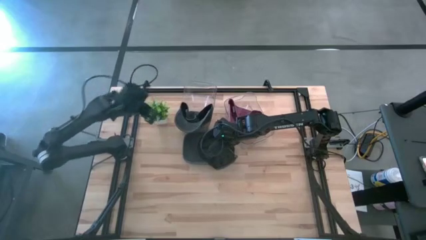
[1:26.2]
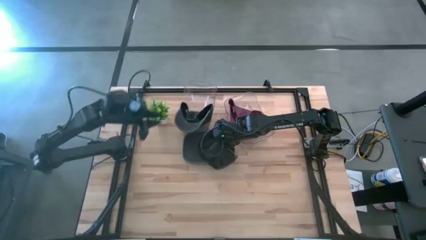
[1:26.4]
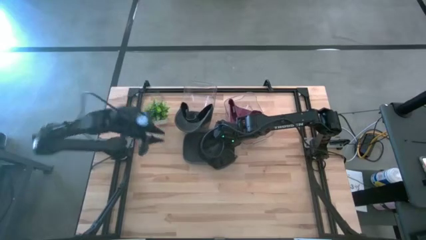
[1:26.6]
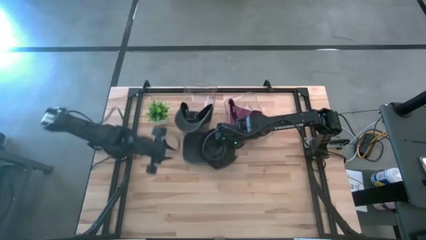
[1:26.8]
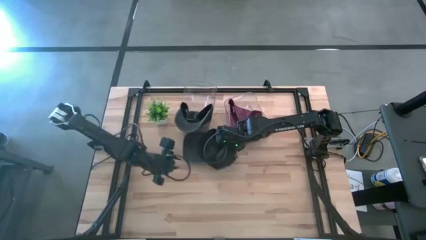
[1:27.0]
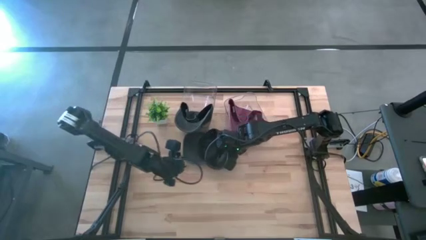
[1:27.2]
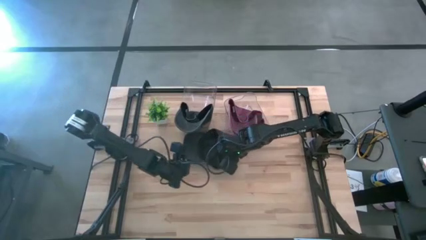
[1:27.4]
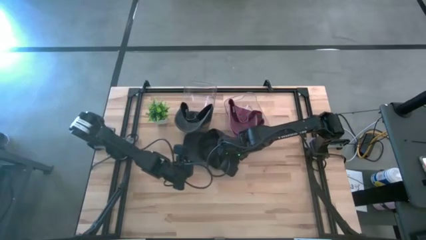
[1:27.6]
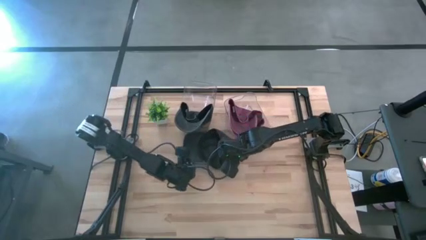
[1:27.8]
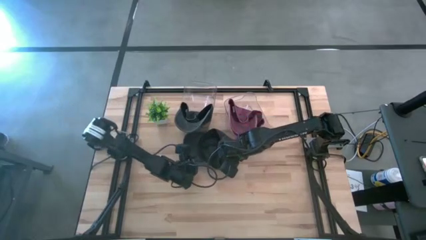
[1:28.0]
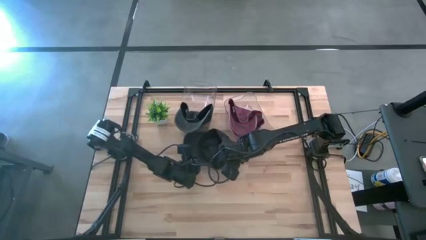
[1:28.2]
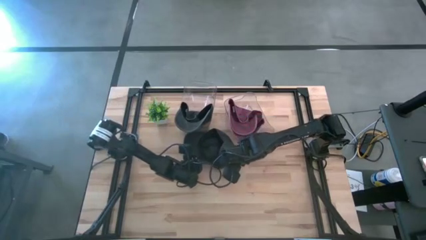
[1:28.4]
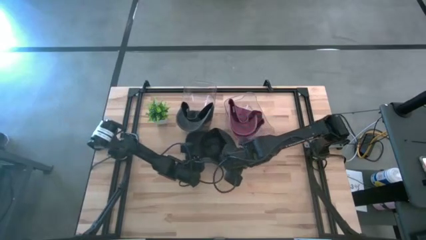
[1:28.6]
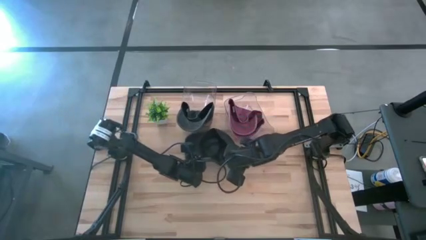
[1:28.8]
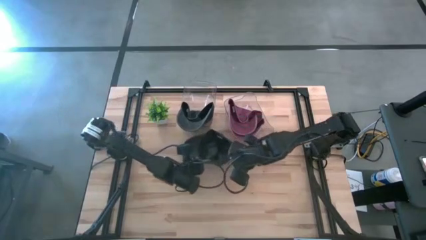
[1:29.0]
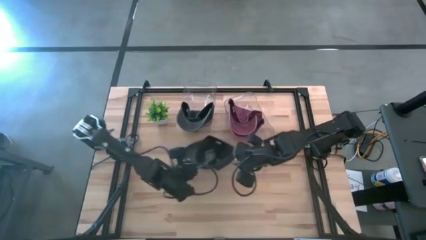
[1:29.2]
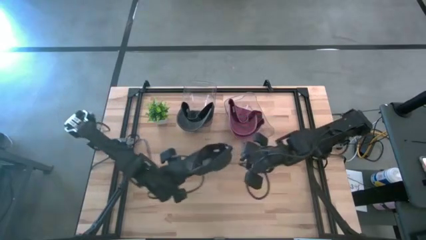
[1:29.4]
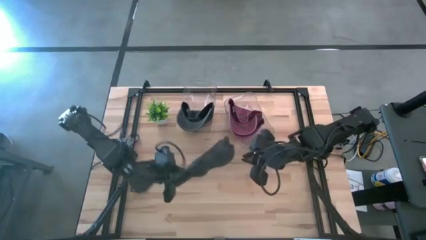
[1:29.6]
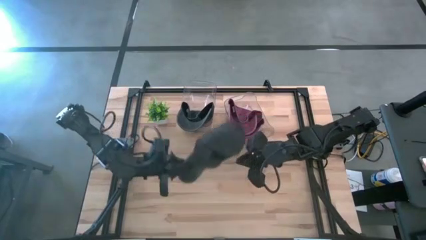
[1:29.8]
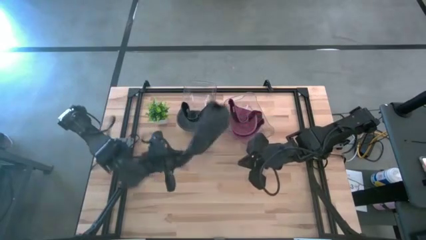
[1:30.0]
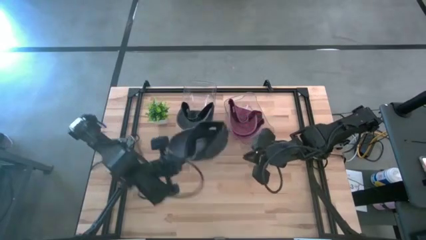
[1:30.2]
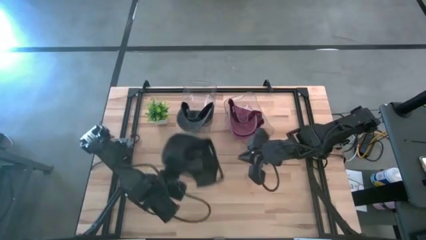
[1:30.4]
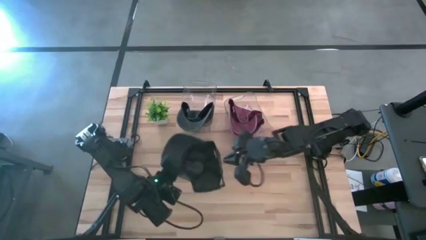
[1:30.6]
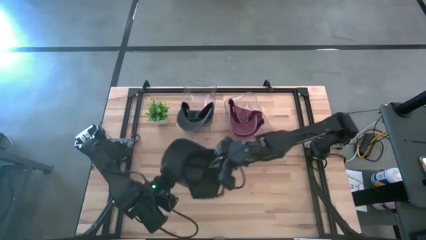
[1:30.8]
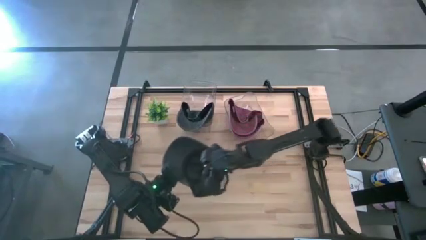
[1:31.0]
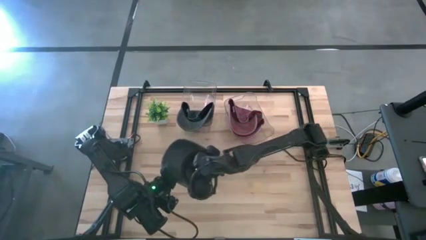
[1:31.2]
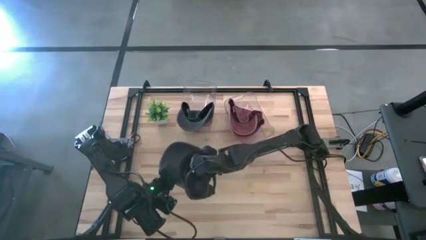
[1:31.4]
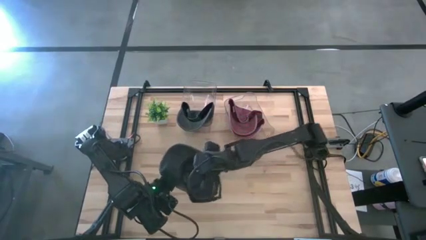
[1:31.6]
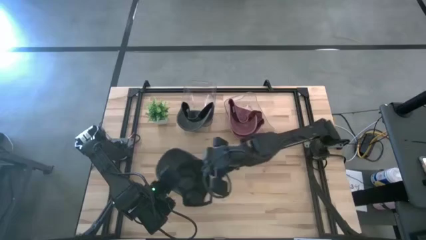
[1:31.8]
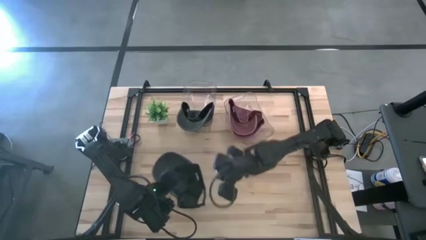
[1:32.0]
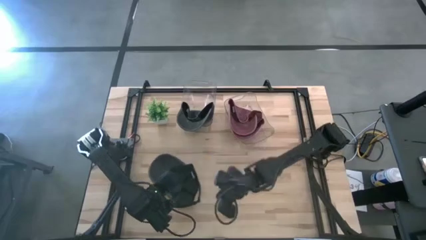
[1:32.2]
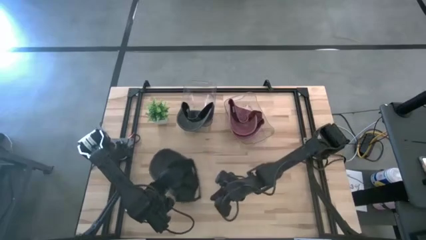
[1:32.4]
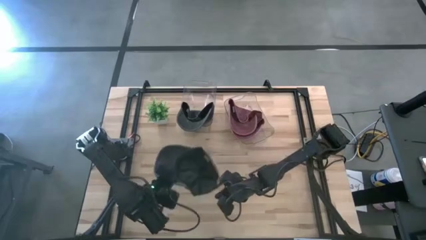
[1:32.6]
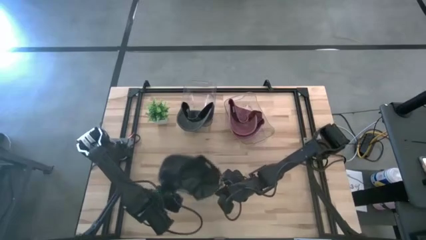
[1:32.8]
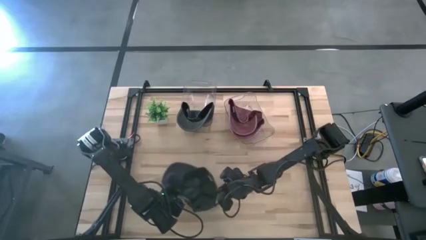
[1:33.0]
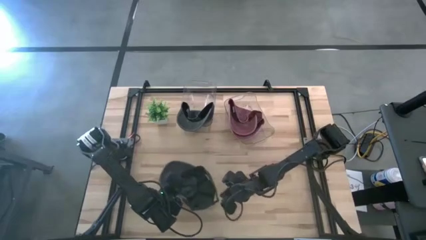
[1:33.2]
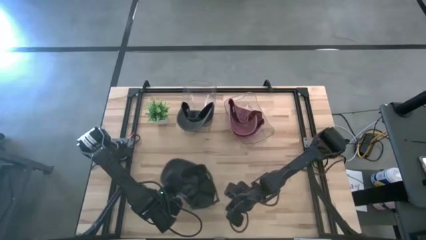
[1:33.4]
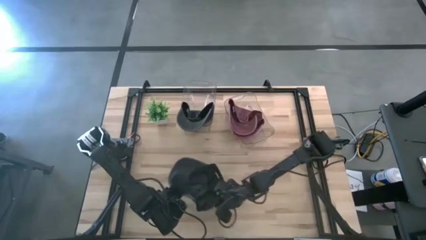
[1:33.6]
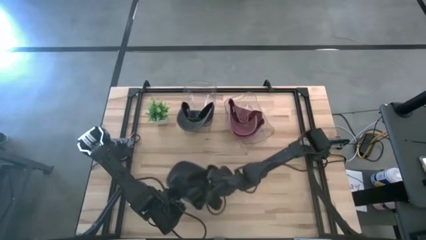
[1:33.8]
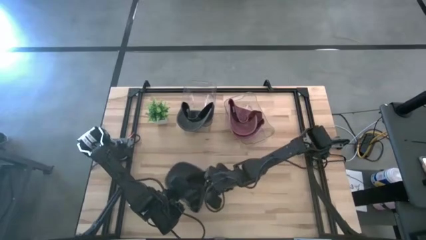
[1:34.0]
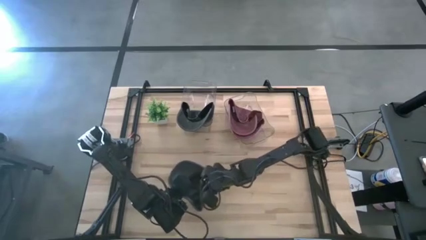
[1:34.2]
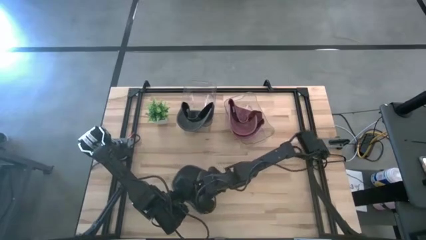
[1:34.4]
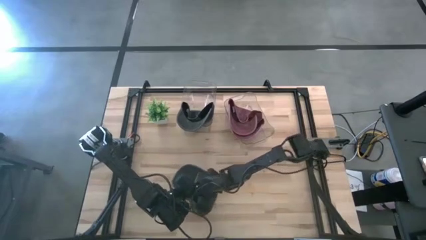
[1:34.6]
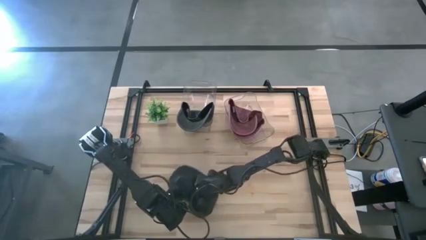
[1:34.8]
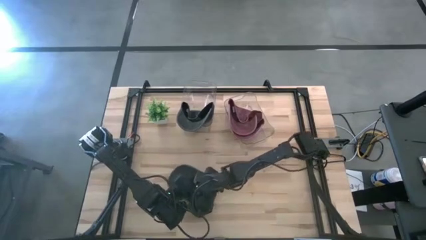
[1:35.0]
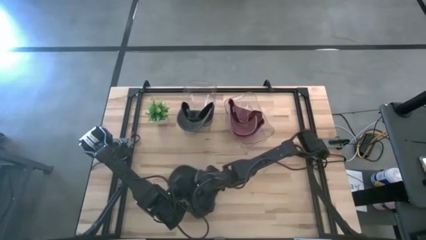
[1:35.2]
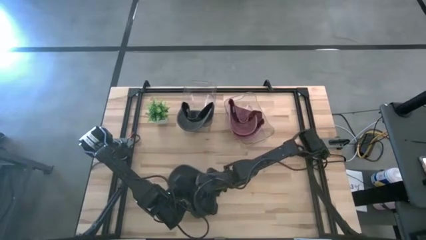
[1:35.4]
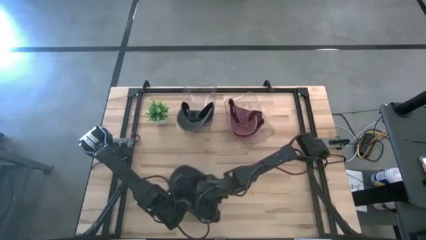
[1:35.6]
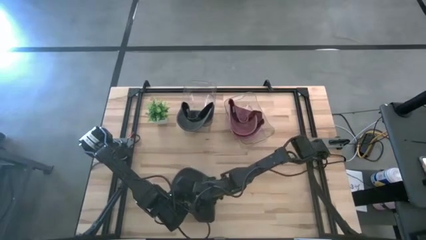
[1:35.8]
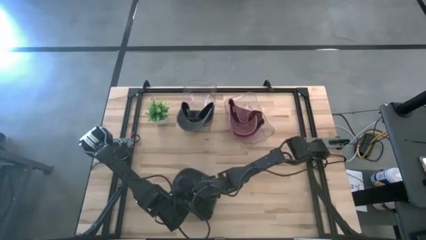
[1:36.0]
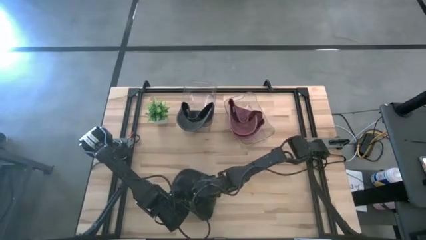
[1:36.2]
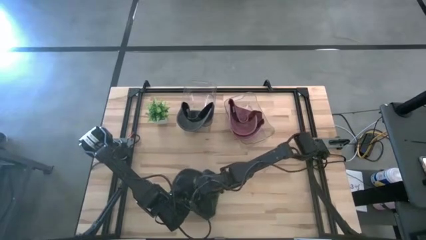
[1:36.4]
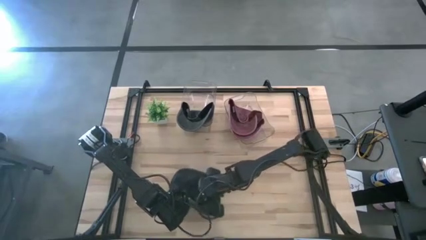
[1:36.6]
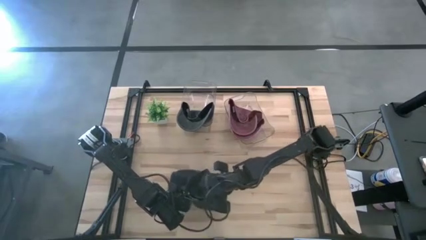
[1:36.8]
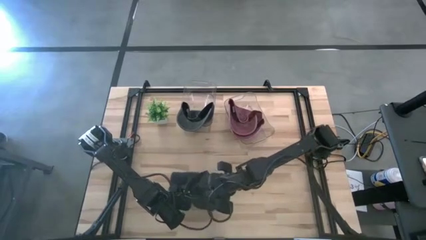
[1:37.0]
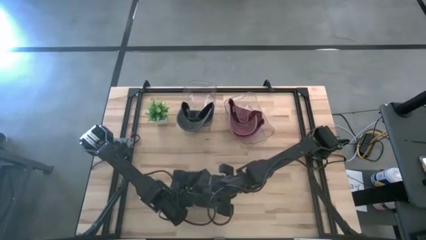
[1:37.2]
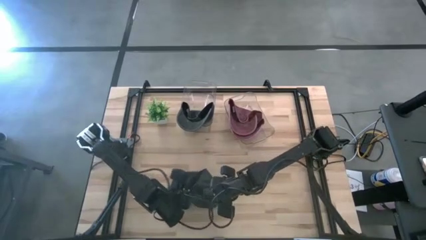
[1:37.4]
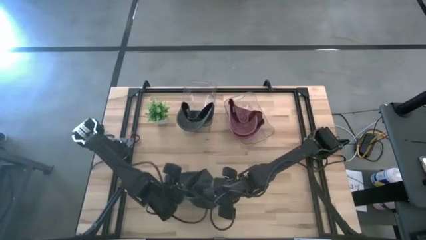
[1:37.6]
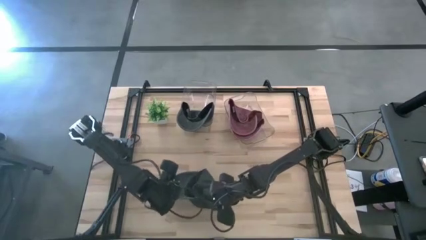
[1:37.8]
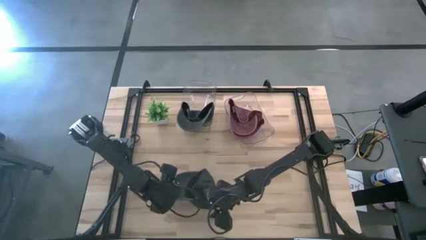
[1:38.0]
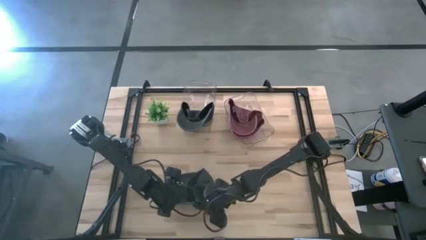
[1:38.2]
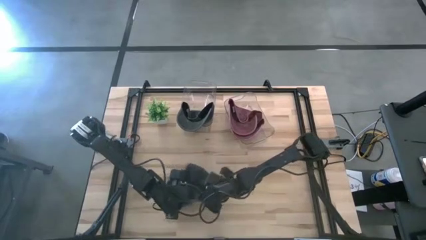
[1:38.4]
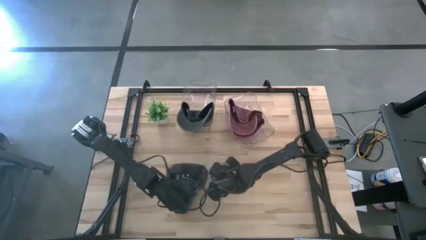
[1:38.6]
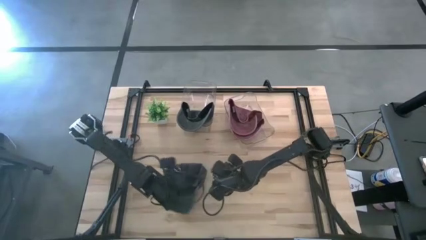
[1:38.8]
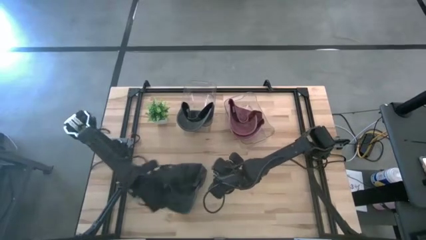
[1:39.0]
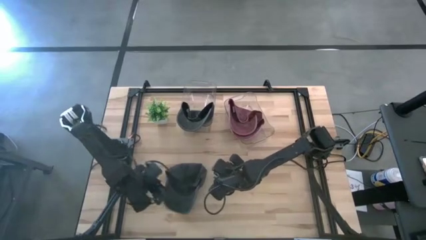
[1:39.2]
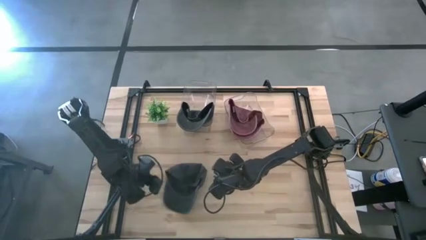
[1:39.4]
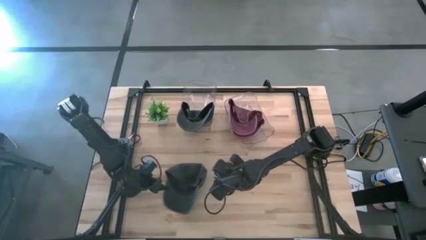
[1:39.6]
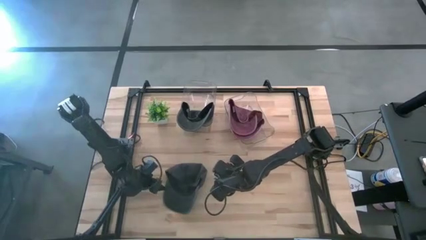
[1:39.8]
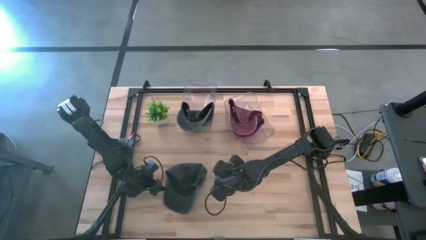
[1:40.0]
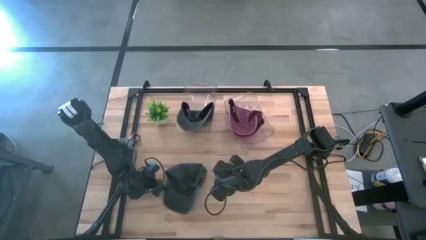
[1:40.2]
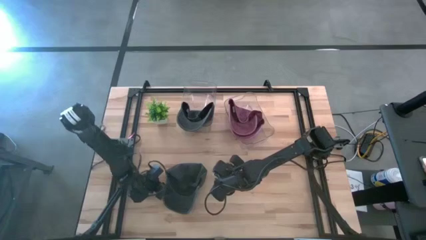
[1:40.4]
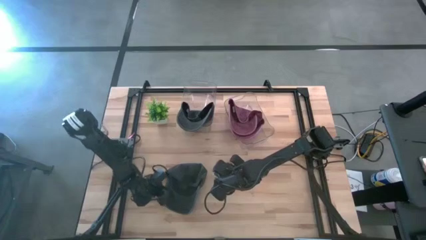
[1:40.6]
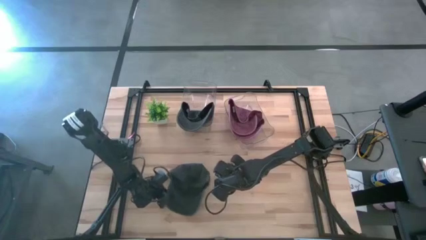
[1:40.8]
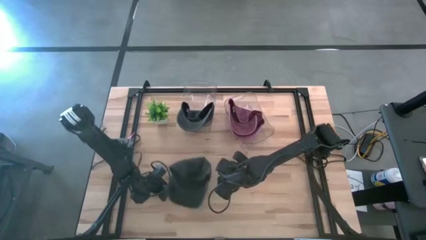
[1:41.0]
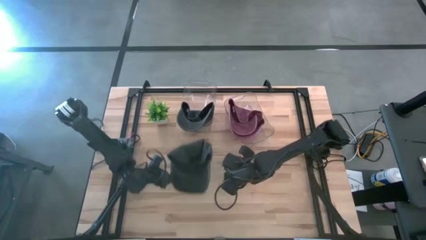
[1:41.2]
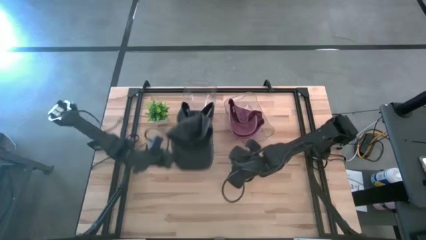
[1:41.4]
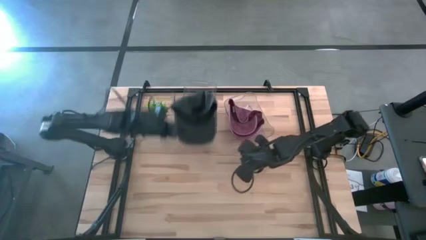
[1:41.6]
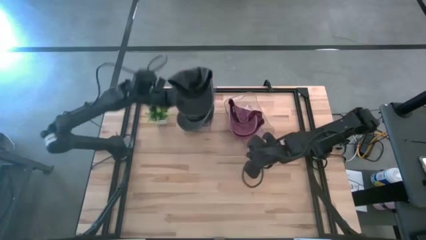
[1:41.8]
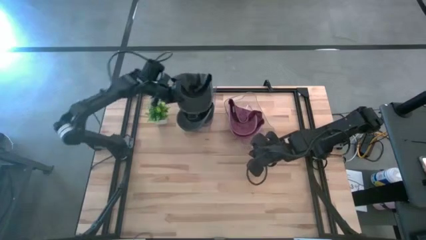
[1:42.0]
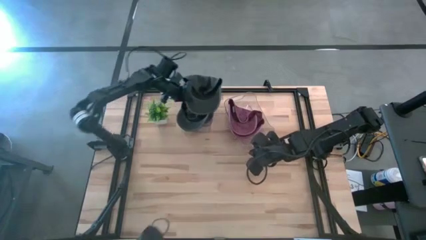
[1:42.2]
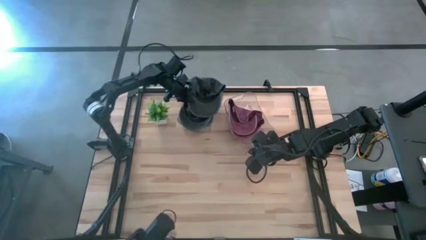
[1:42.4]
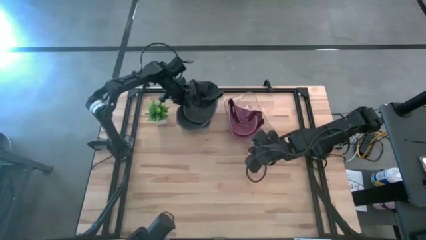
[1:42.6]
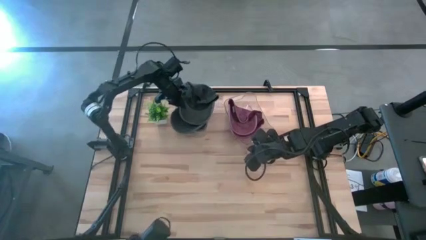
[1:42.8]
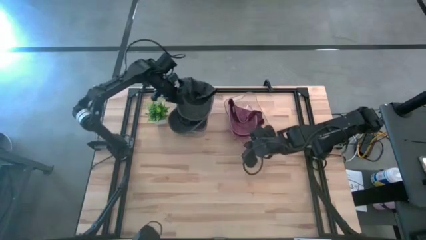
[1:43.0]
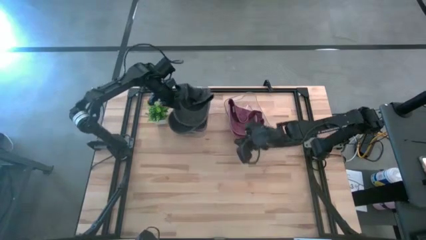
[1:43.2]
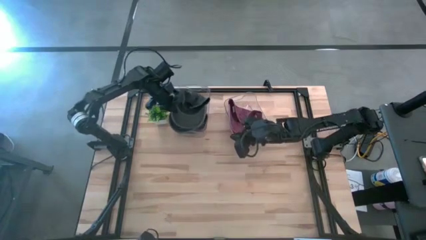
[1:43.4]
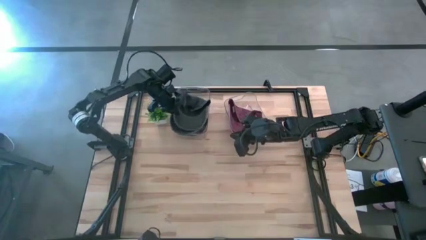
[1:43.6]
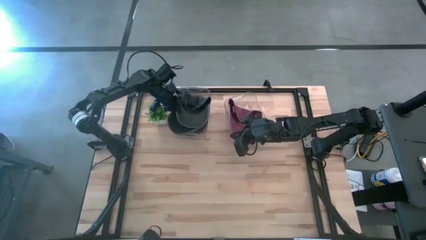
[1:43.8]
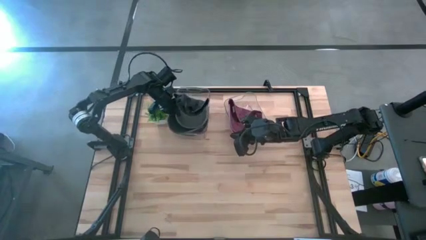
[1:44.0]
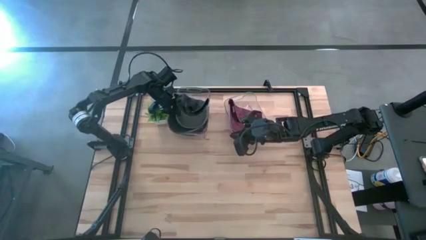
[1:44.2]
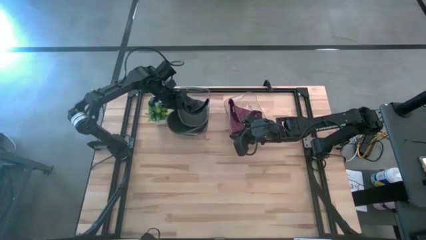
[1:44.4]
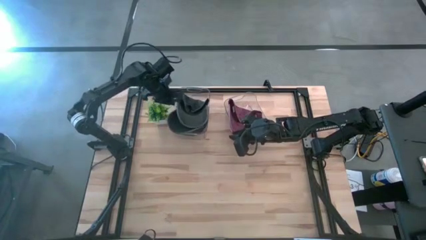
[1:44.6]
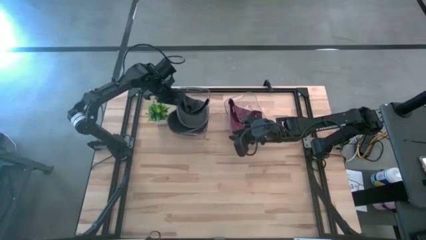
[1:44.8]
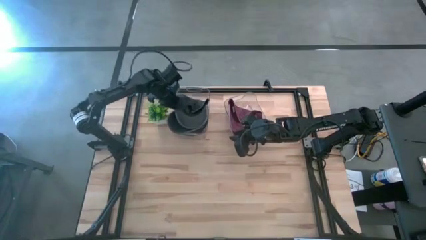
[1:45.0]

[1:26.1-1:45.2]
Task: Pick & Place hat
Put the black cap into the left transparent bin
